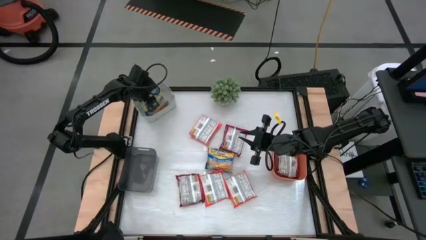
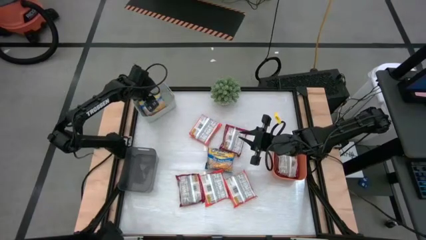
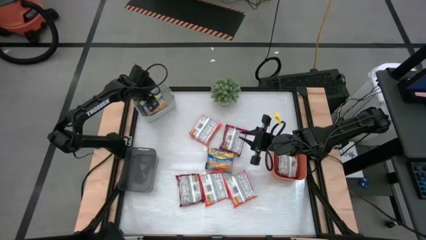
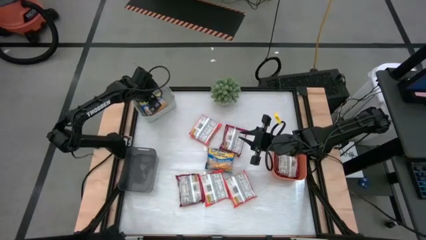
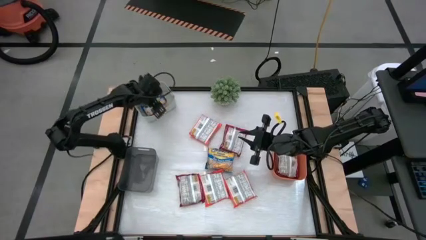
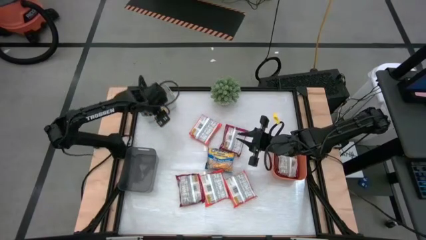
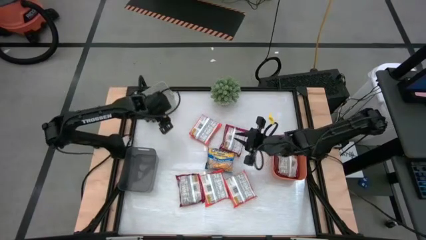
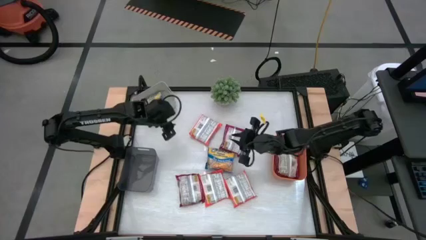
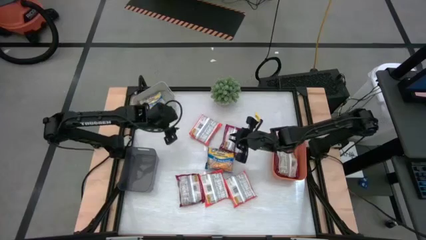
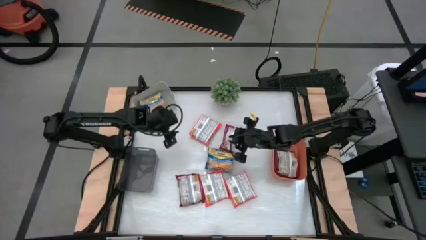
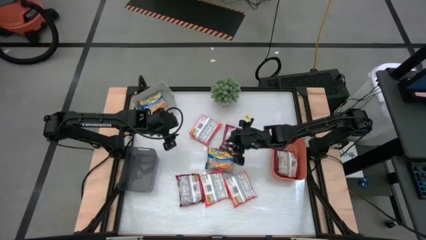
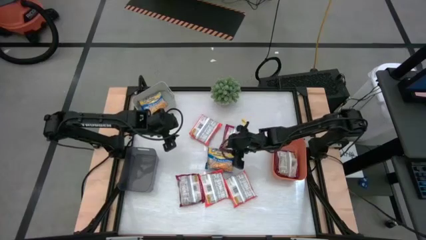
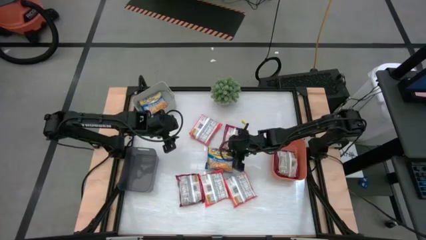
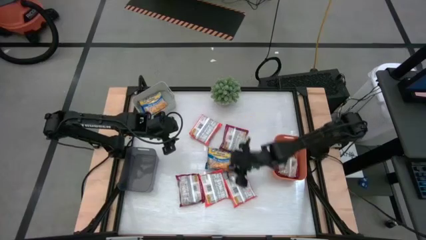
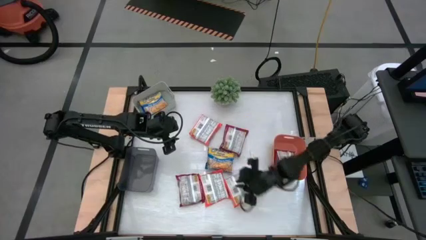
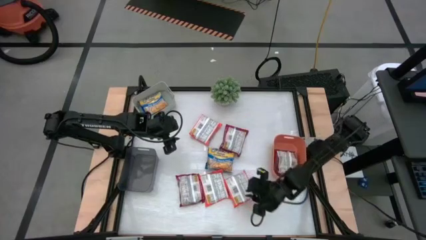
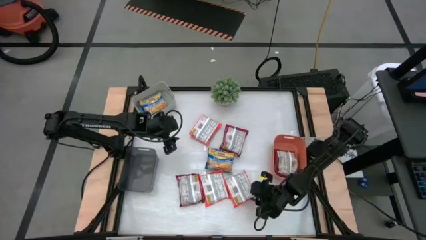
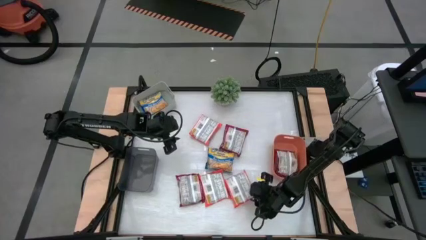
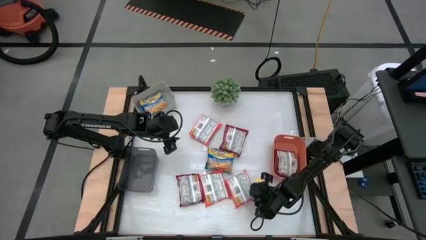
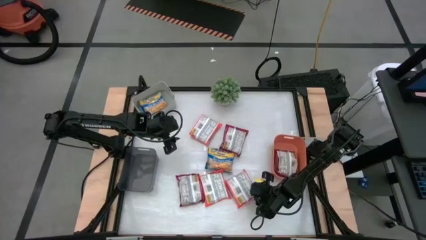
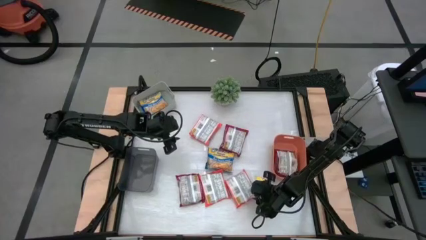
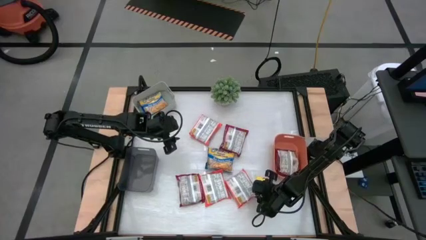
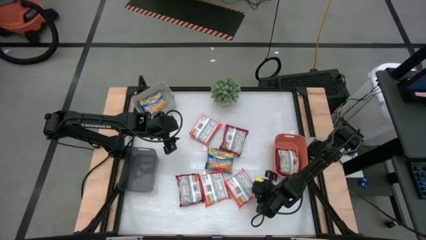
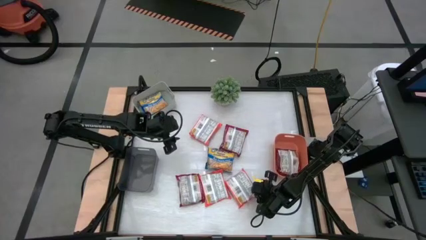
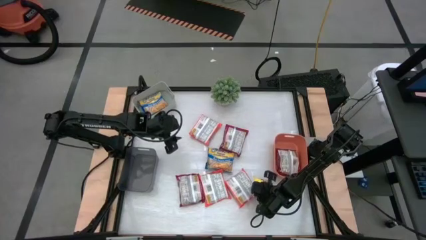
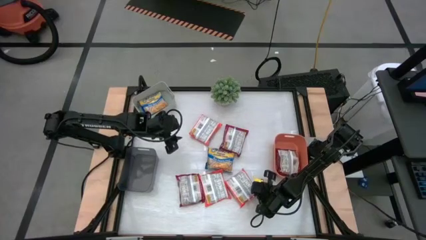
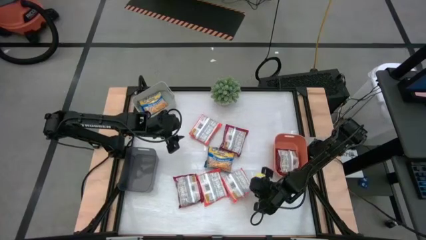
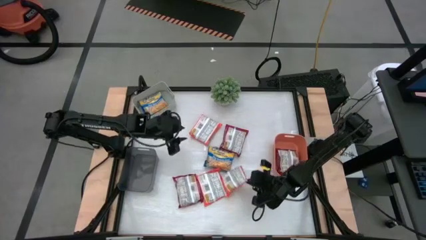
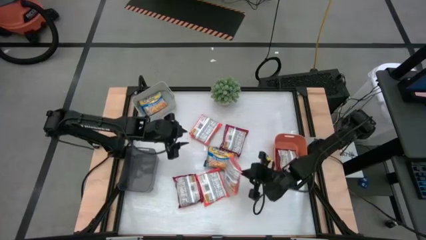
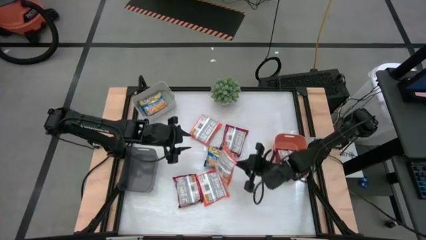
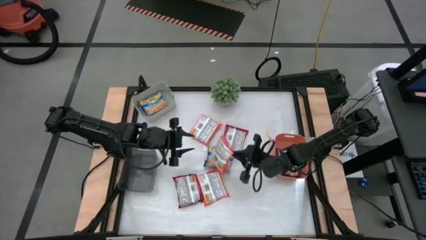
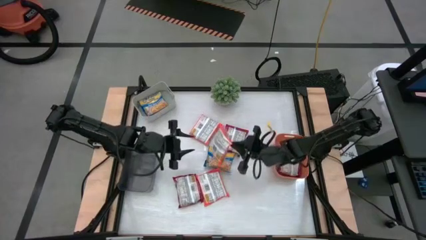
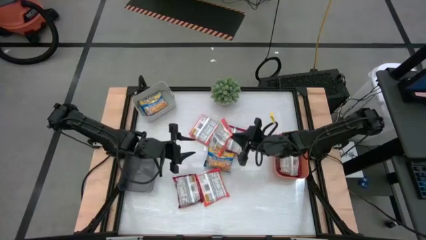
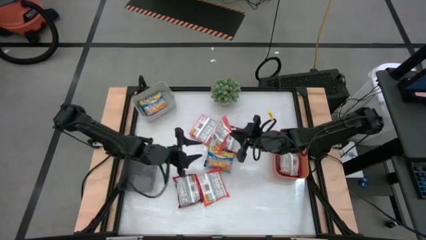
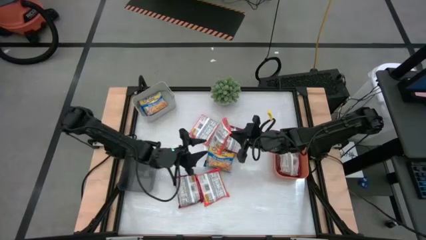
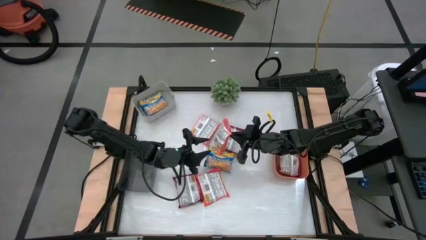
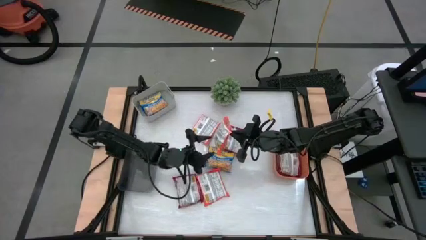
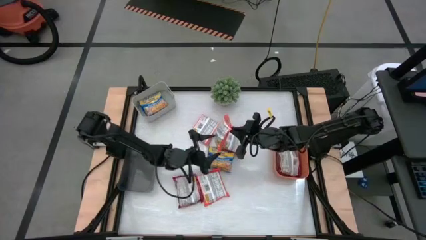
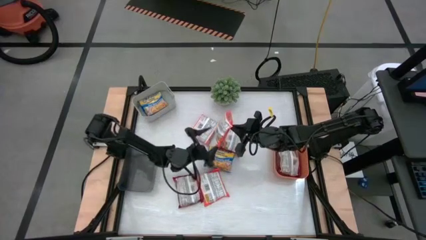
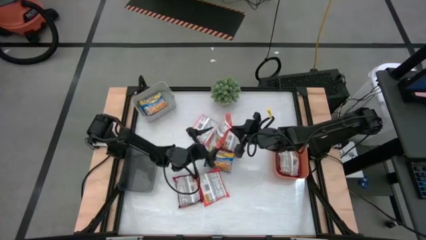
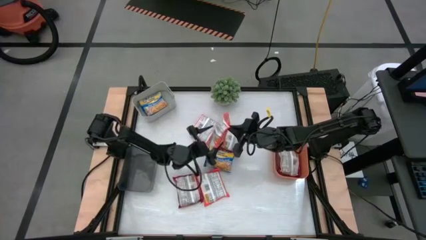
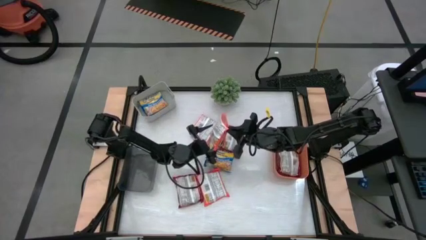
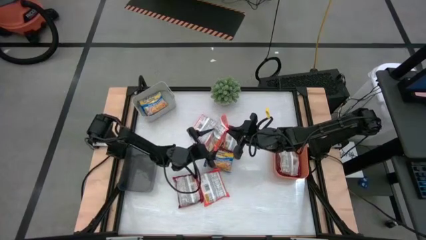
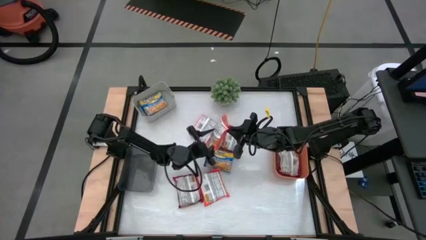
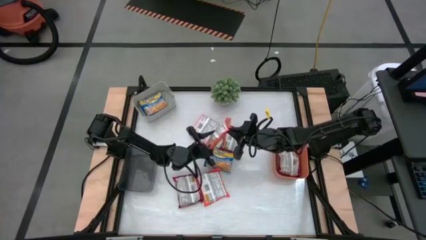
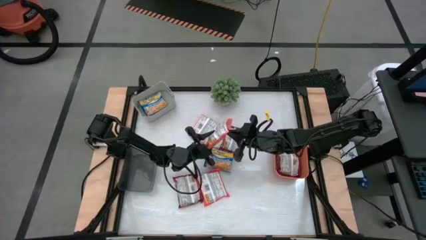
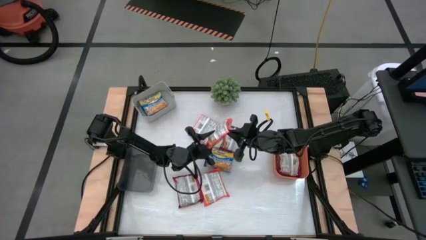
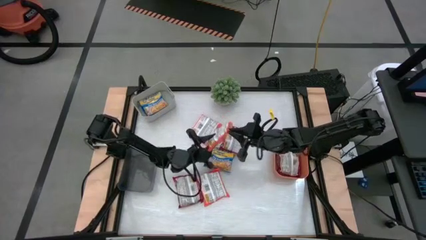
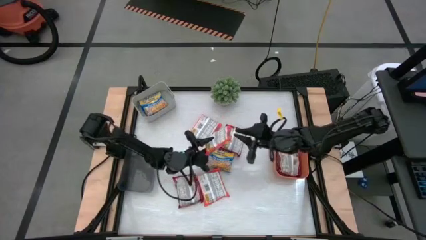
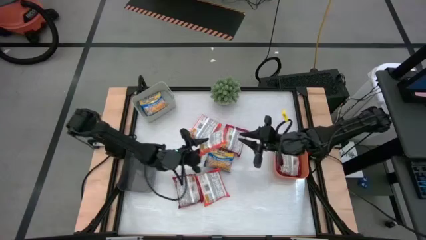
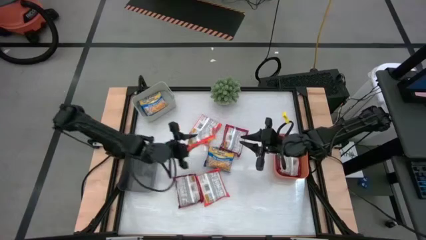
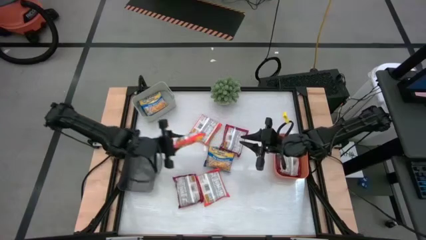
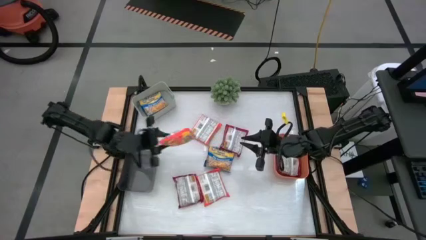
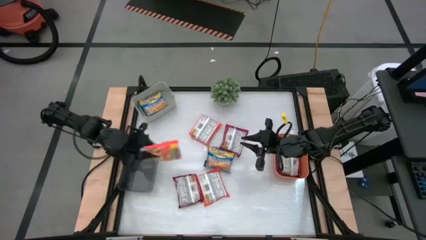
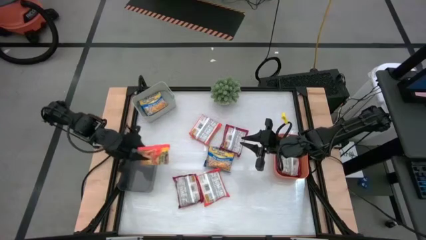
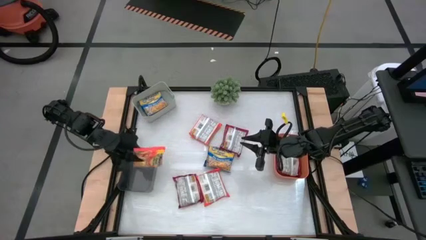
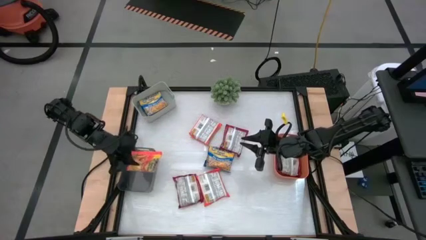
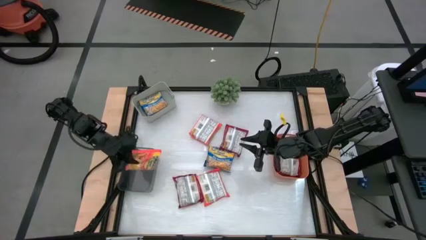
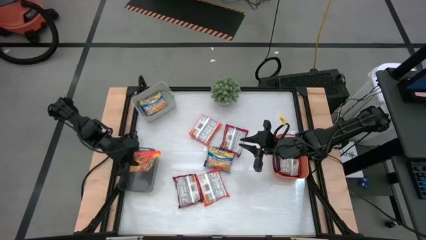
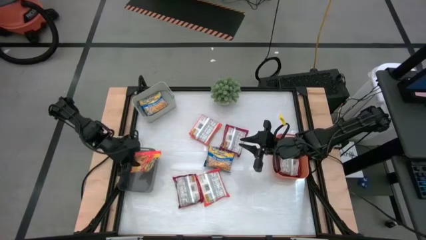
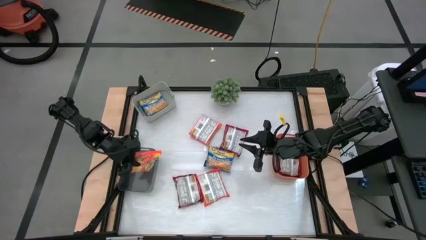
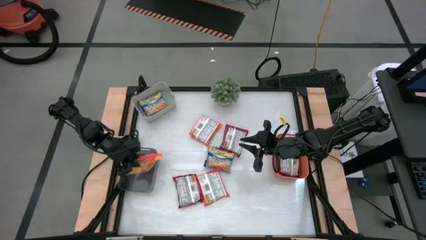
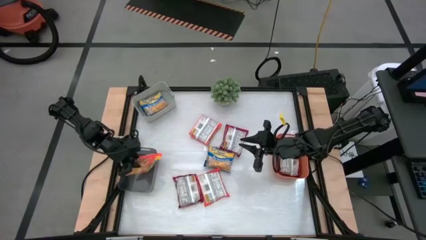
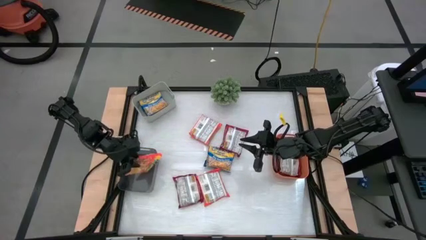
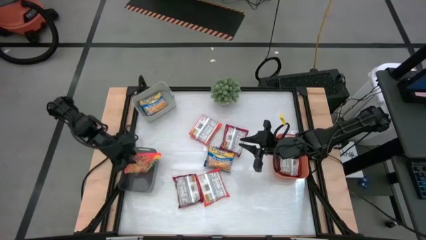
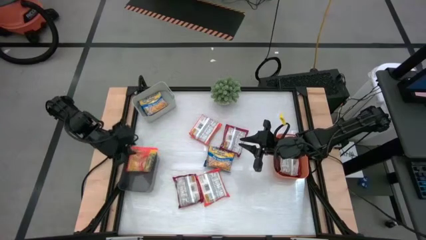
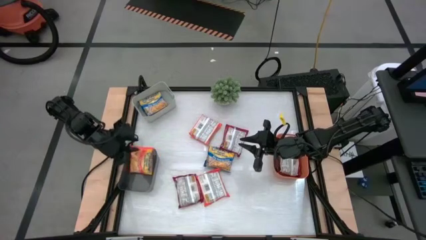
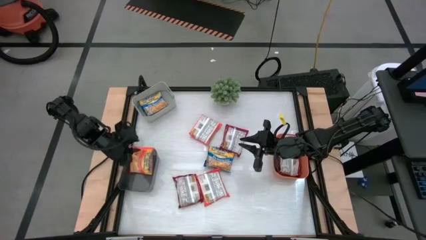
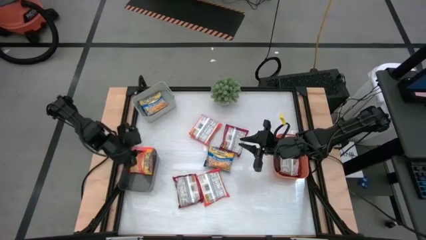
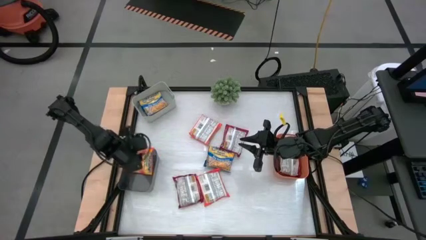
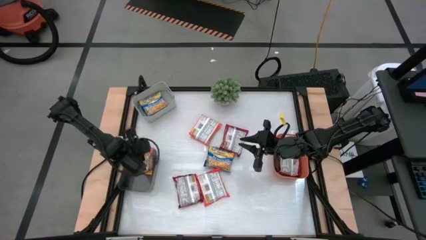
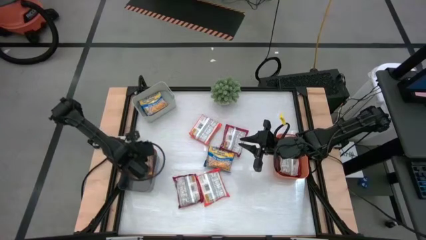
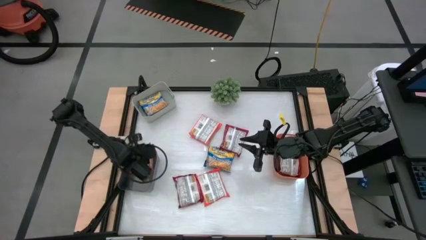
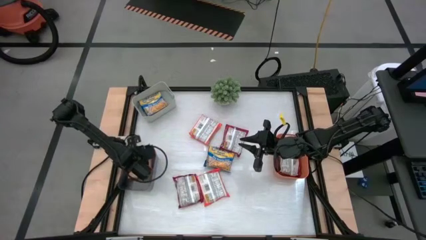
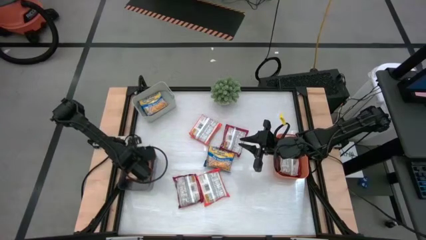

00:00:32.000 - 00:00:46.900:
Task: Sort Maruchan noodles
Put the orange bag into the black bin
